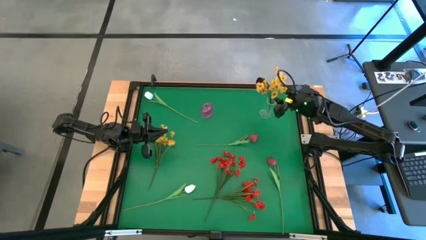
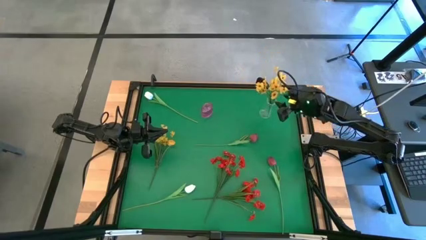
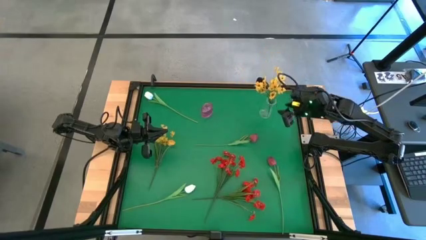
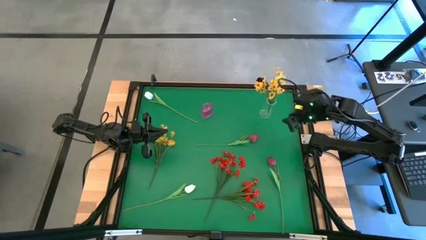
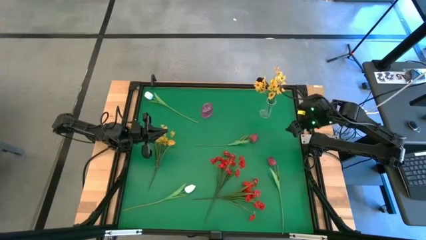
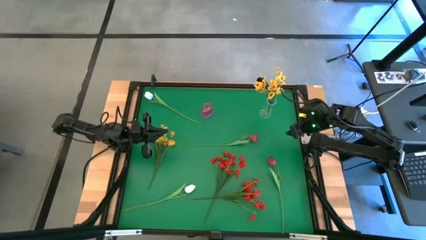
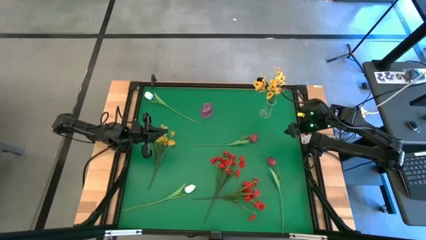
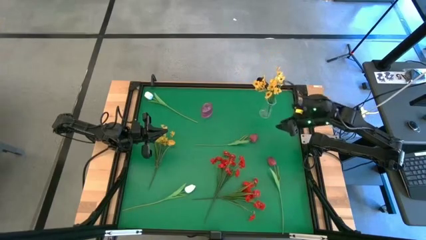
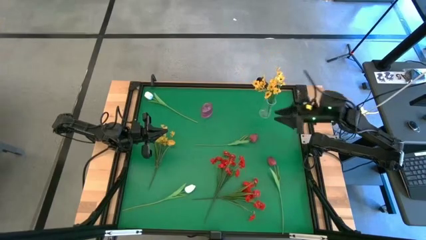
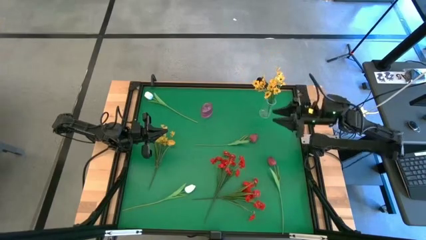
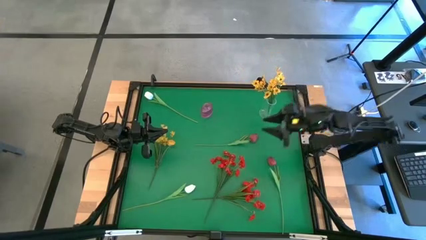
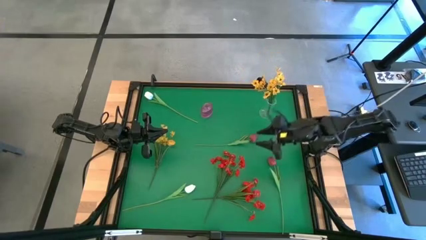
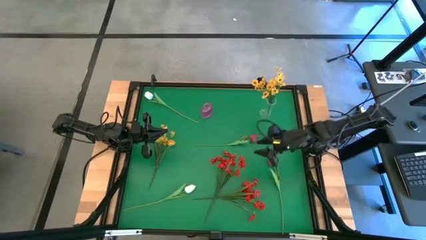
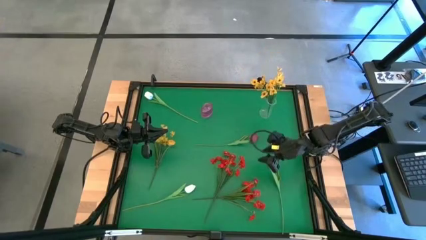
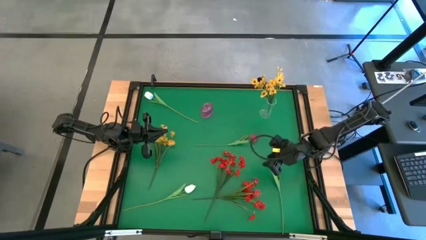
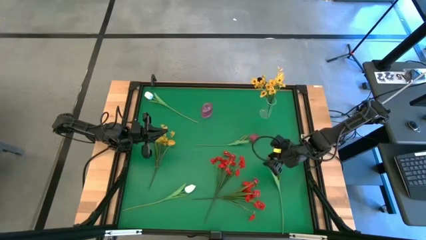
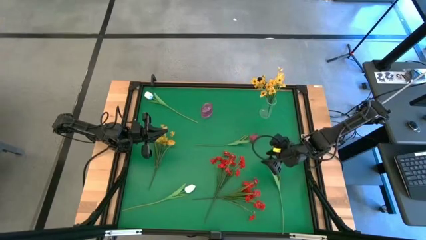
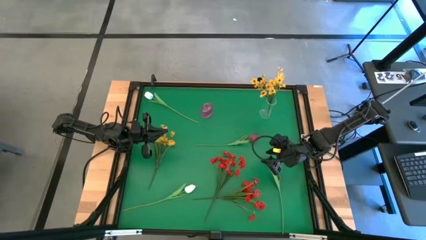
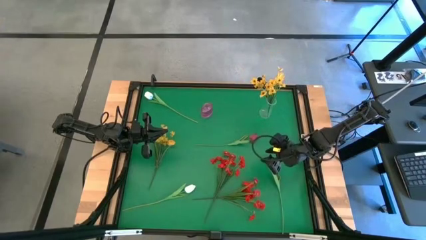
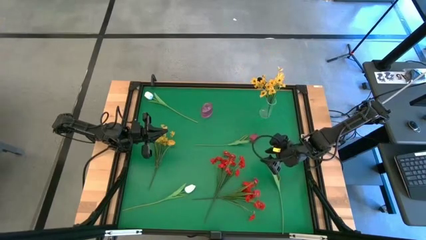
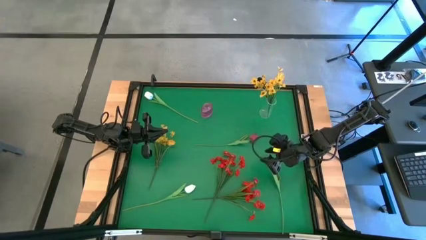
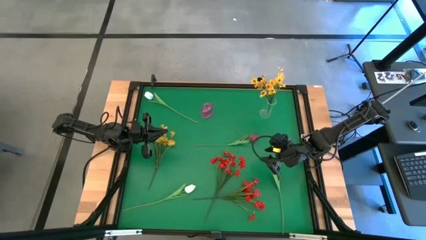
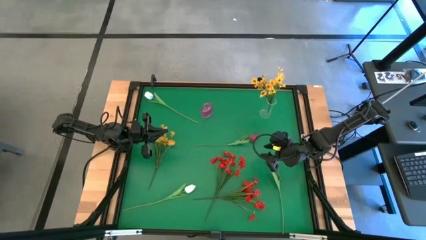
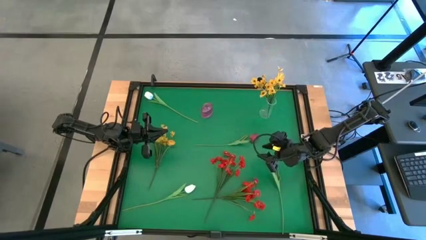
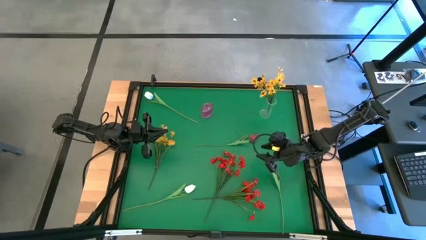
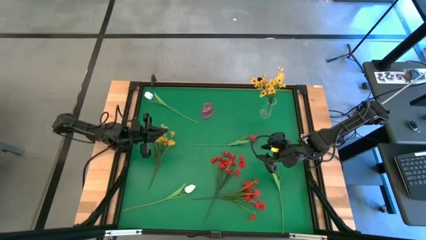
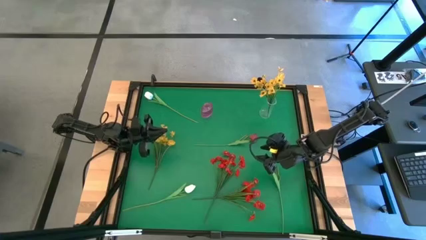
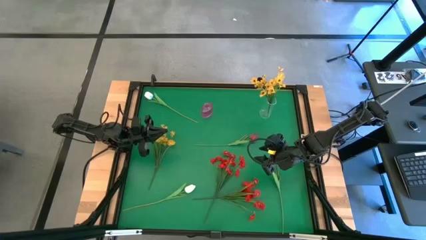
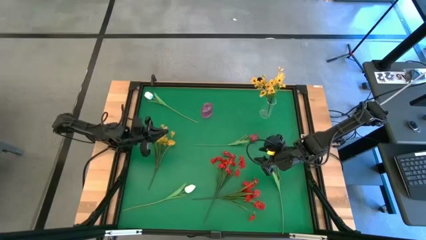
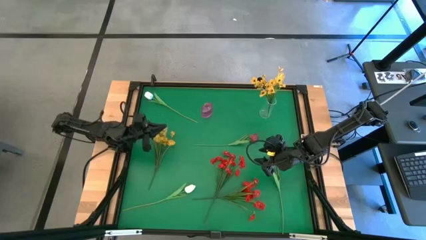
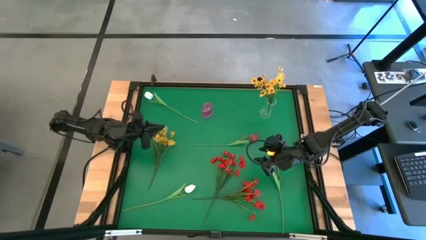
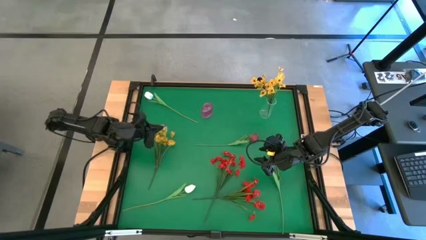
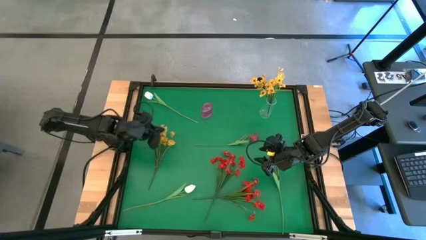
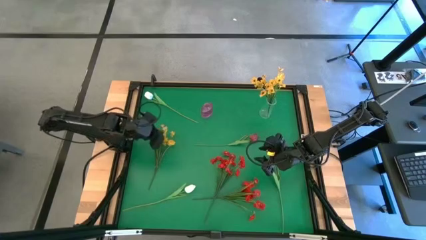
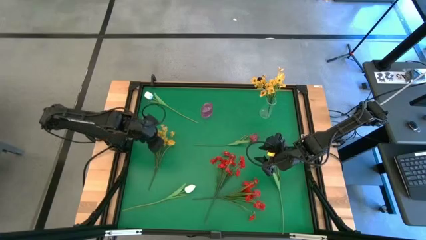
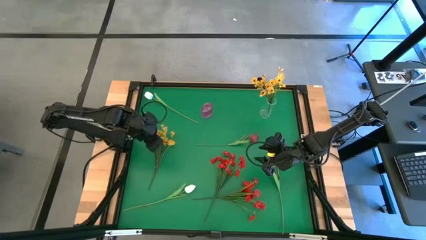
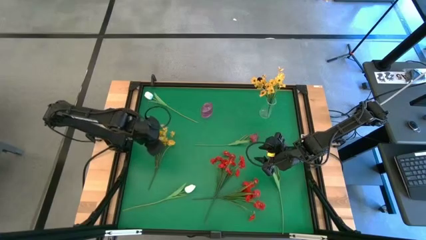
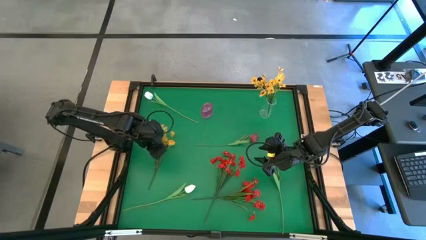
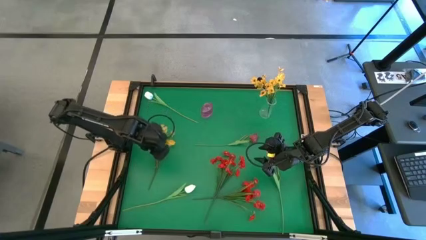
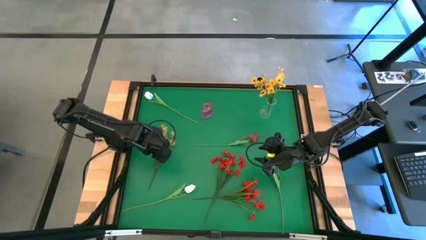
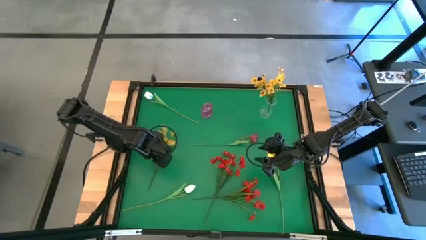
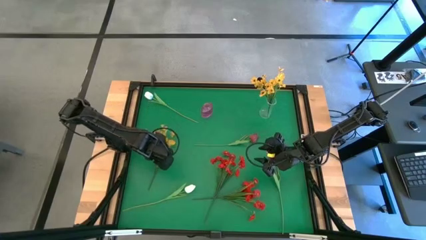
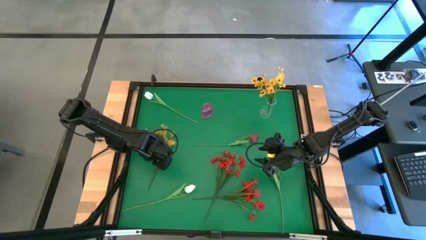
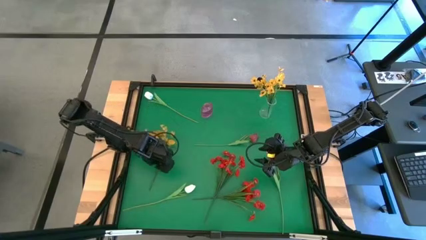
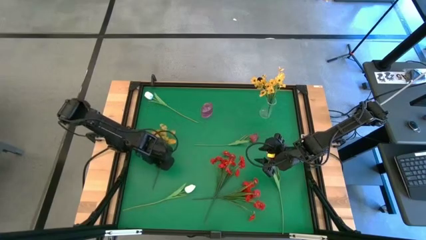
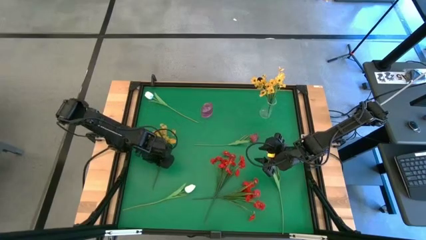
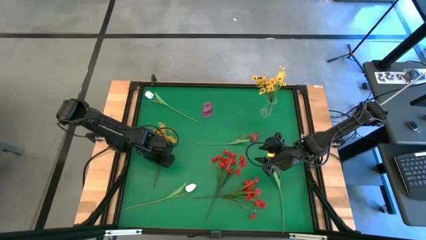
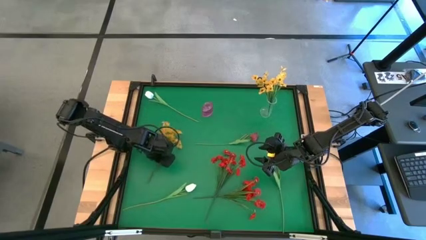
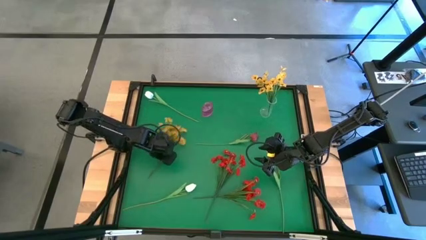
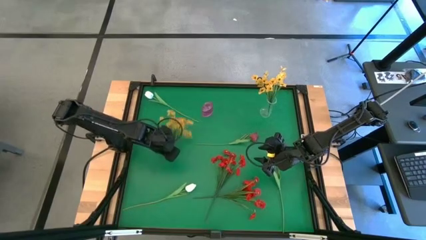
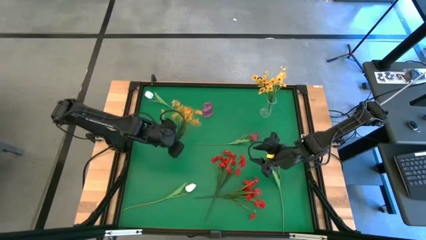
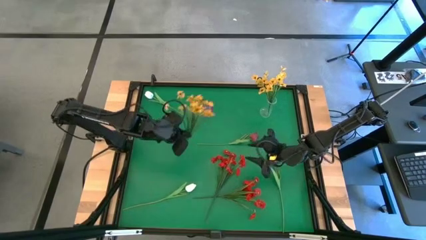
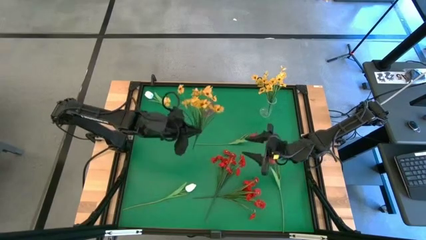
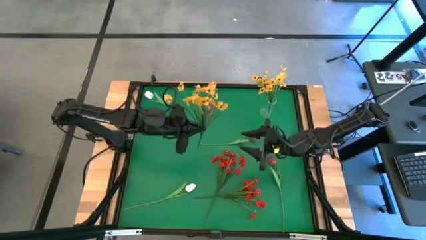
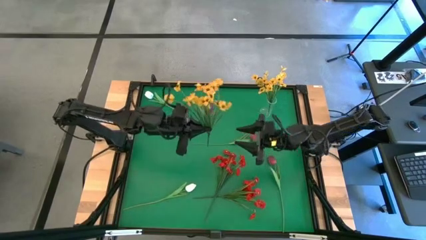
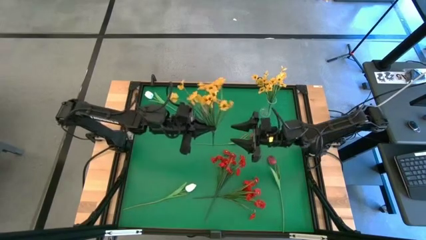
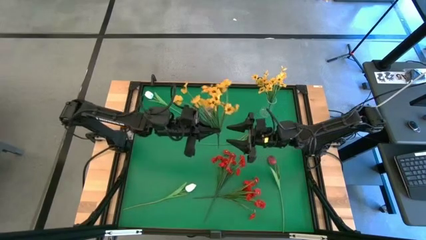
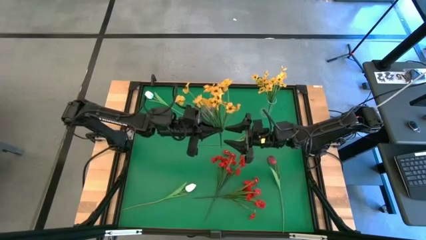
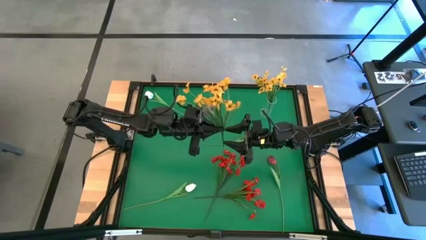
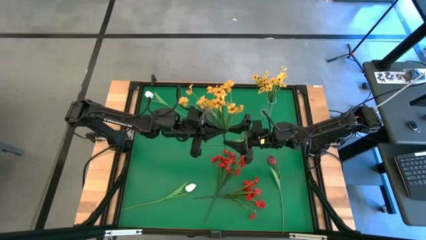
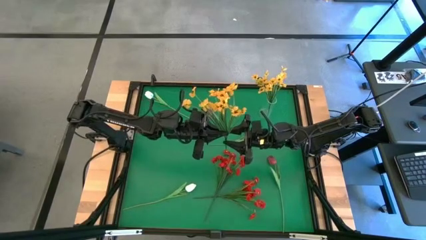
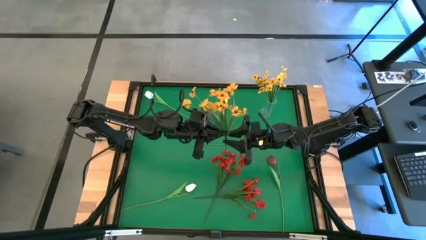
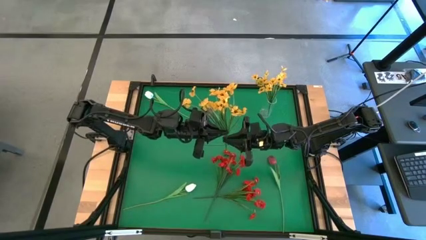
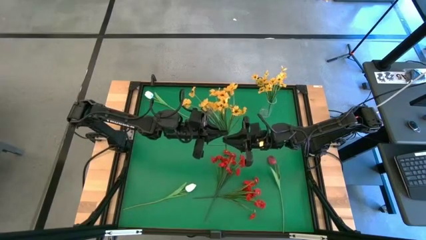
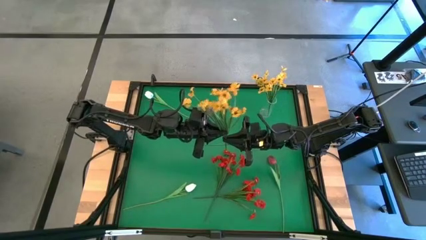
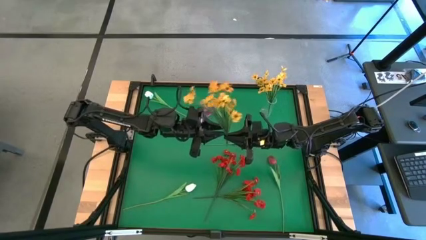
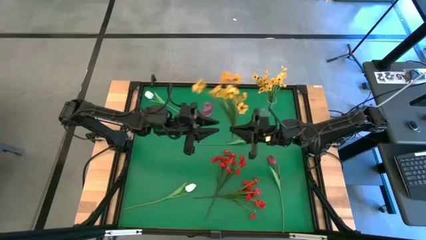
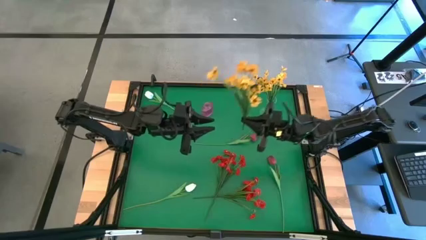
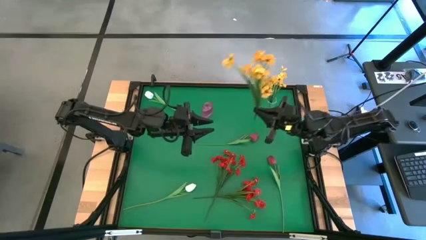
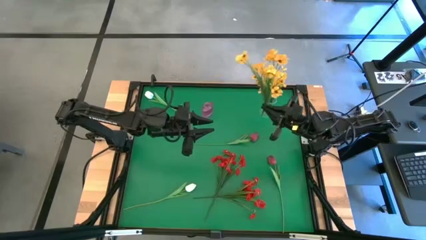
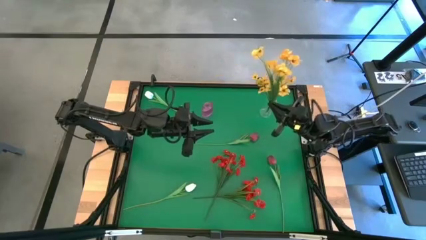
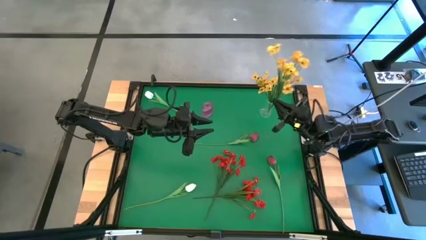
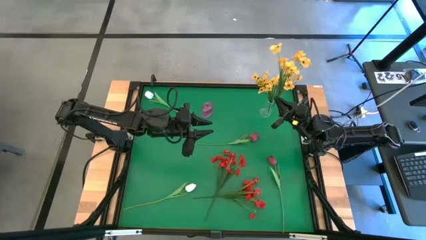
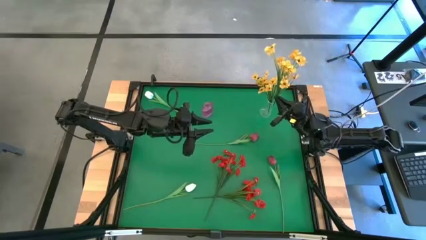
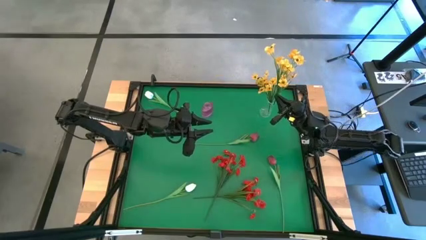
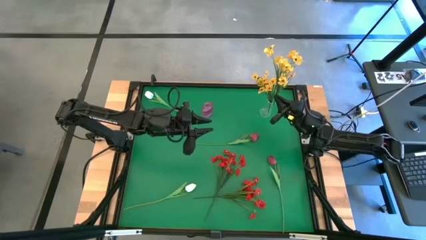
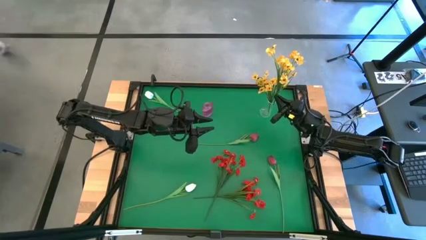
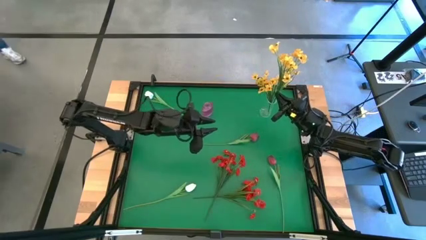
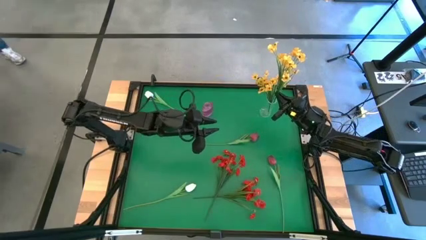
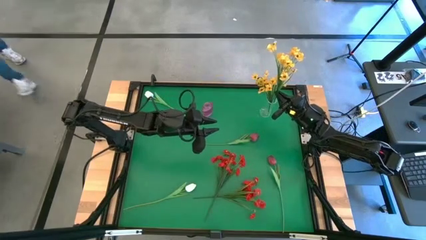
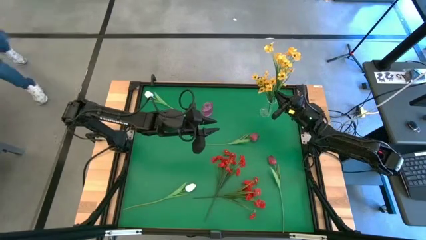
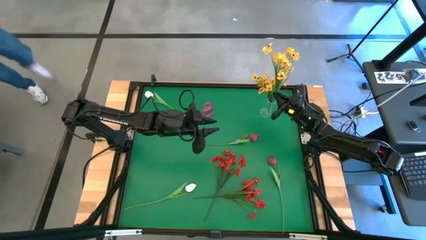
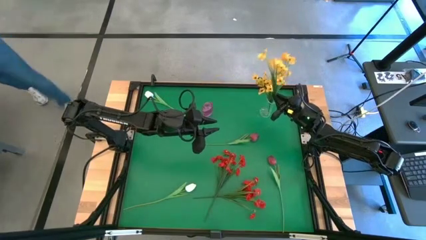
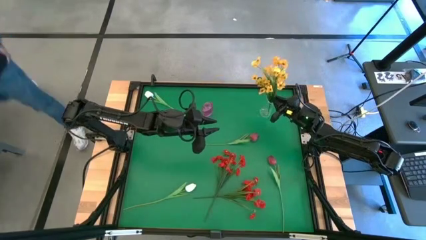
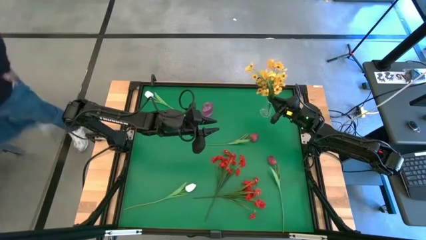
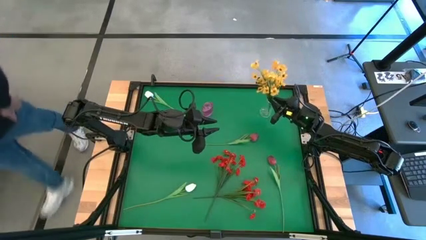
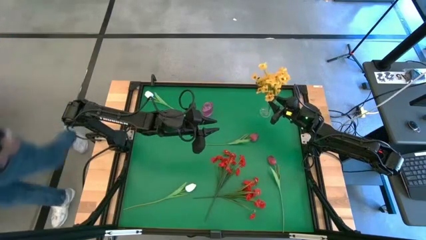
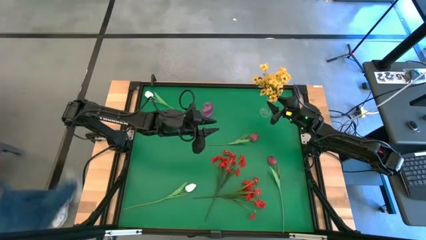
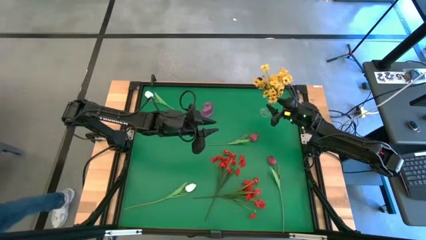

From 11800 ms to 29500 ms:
Task: Sort flowers into vase by color
Put the yellow flowers into the transparent vase
